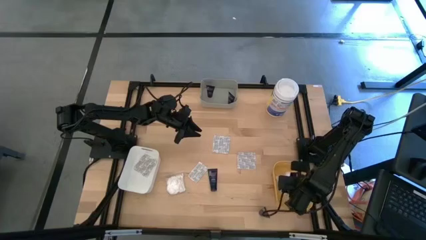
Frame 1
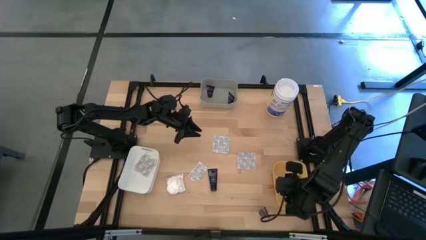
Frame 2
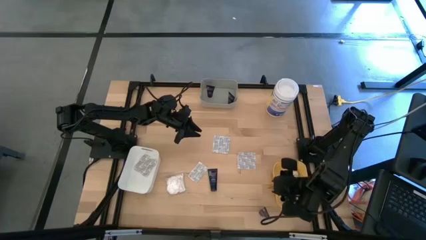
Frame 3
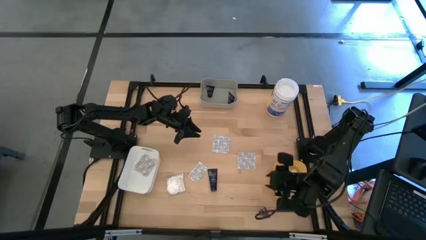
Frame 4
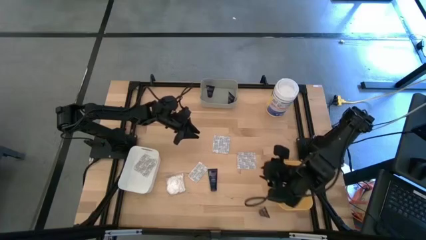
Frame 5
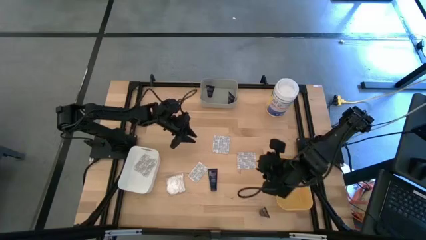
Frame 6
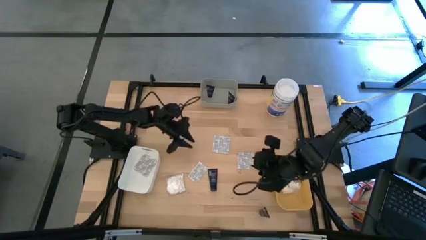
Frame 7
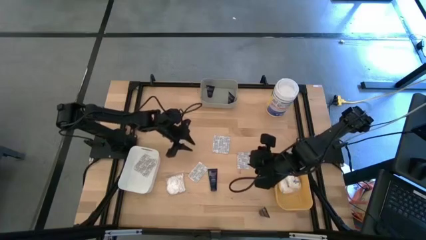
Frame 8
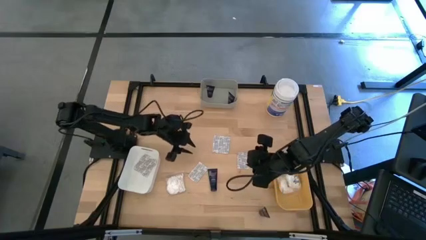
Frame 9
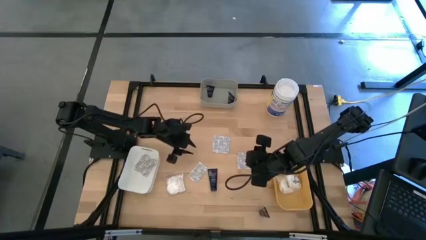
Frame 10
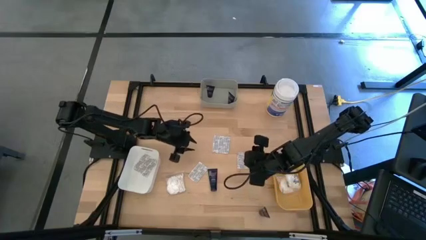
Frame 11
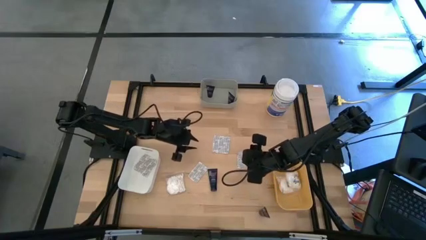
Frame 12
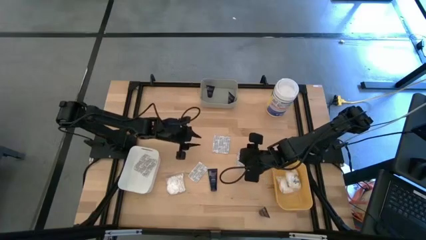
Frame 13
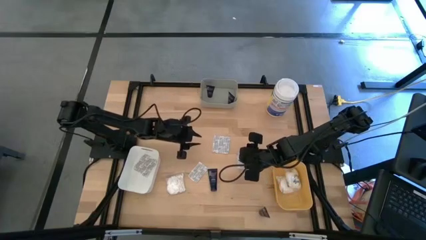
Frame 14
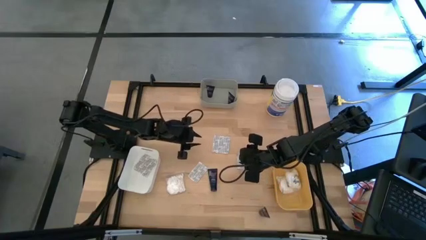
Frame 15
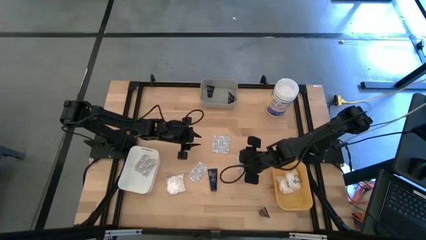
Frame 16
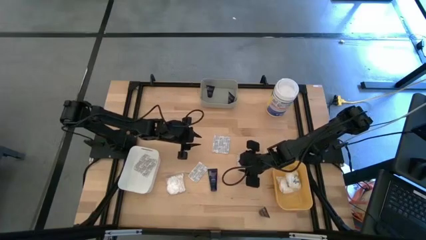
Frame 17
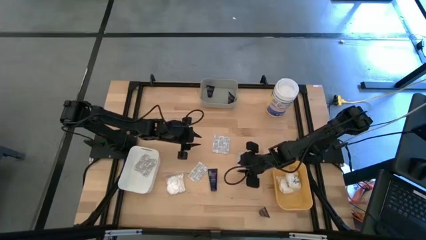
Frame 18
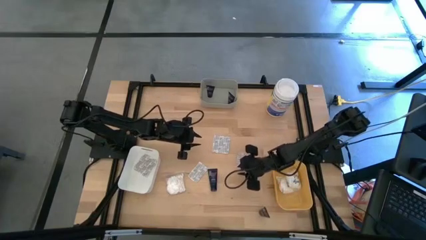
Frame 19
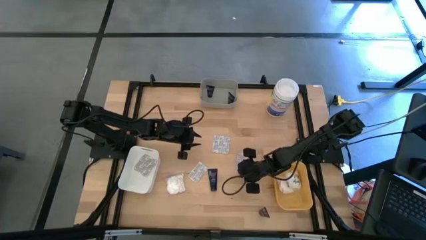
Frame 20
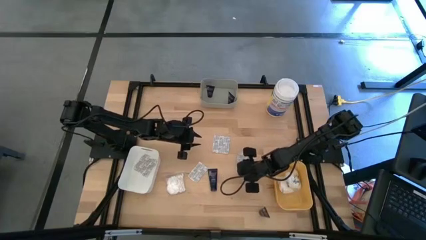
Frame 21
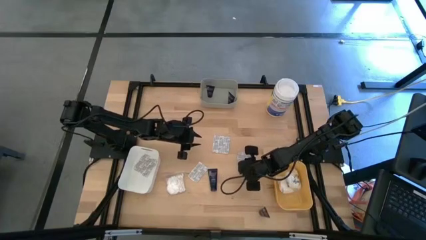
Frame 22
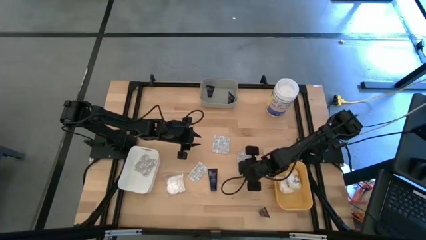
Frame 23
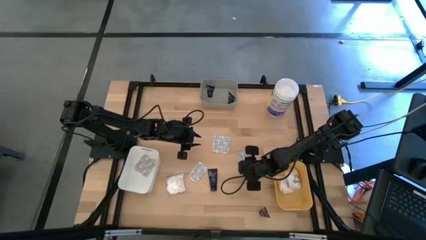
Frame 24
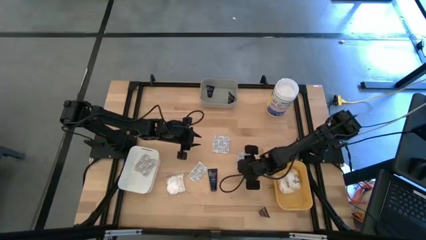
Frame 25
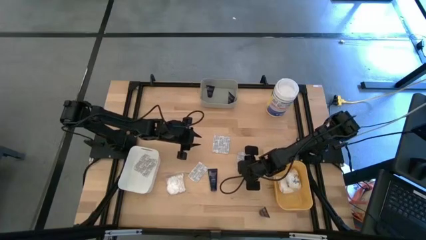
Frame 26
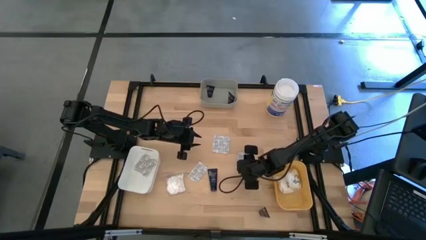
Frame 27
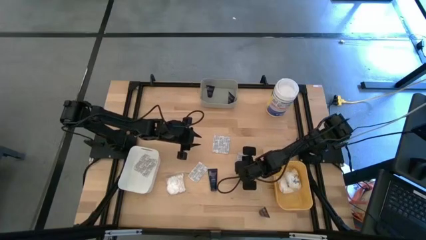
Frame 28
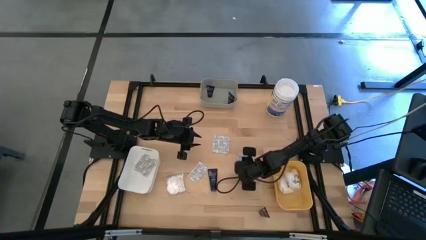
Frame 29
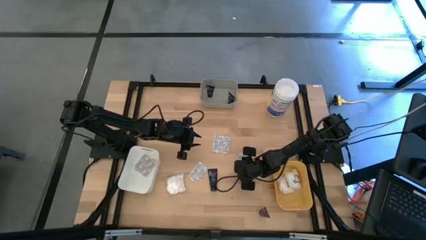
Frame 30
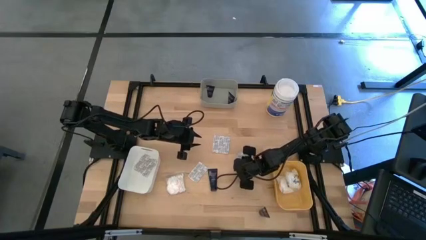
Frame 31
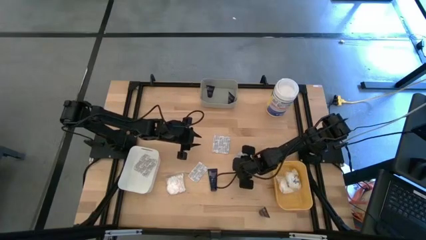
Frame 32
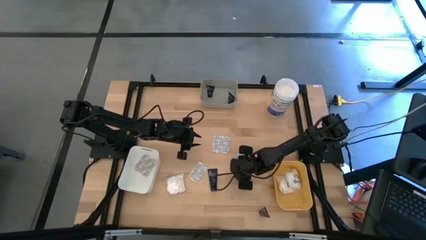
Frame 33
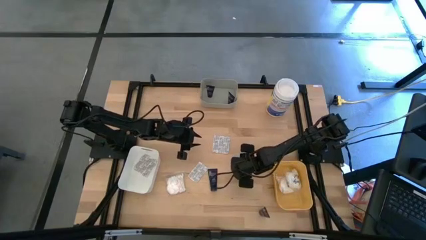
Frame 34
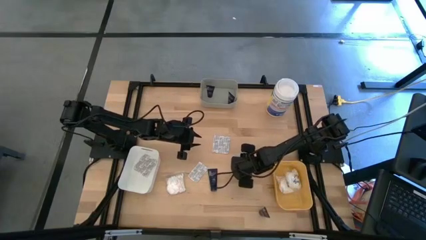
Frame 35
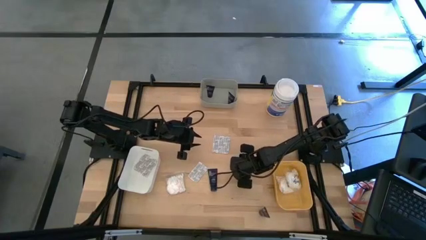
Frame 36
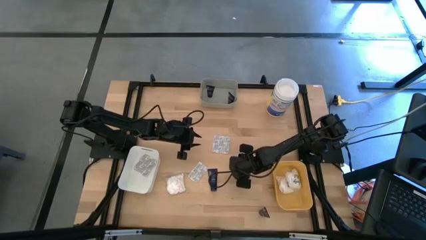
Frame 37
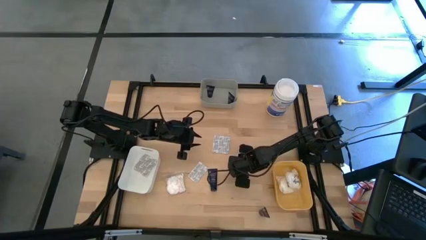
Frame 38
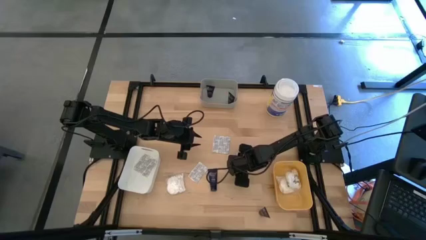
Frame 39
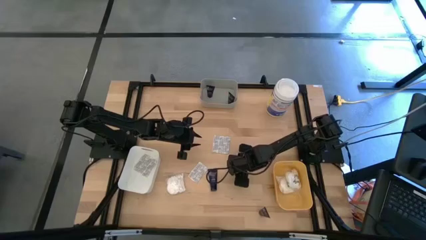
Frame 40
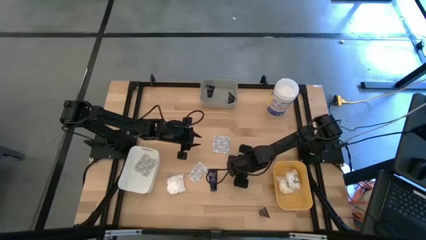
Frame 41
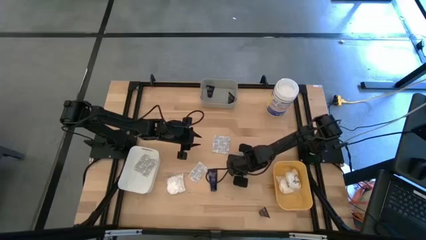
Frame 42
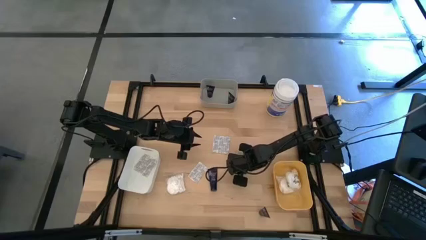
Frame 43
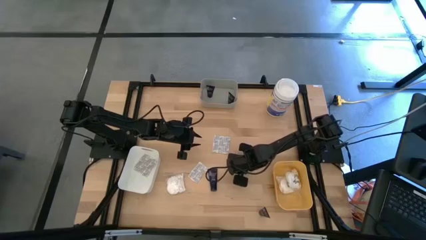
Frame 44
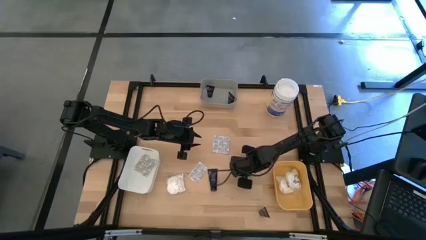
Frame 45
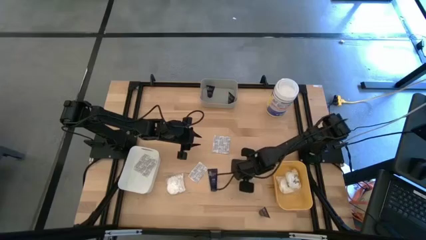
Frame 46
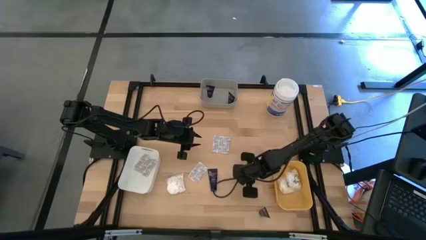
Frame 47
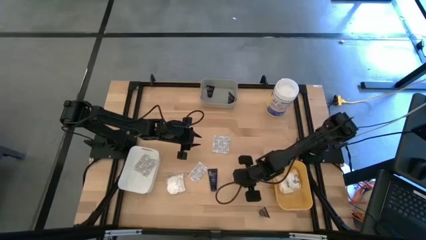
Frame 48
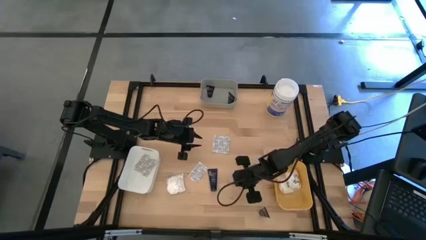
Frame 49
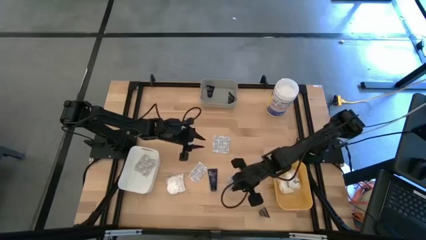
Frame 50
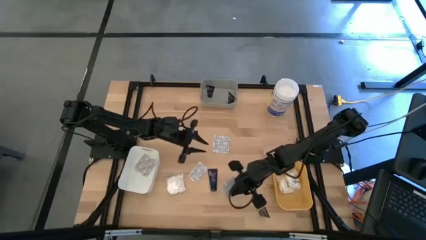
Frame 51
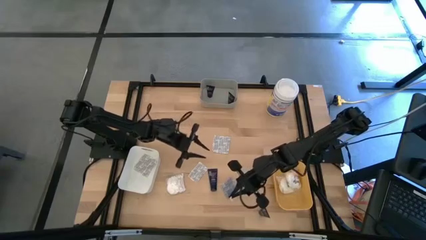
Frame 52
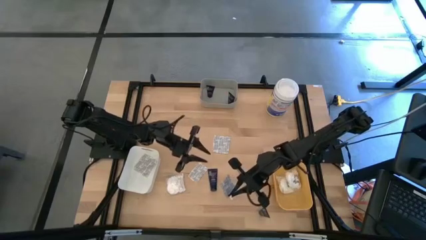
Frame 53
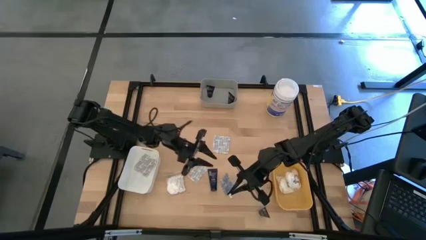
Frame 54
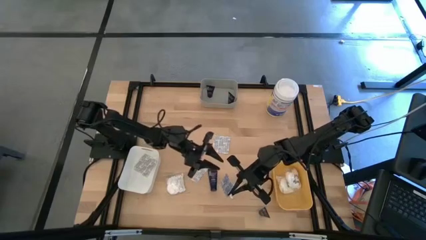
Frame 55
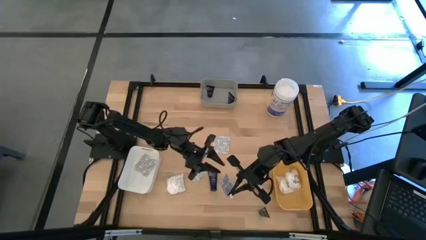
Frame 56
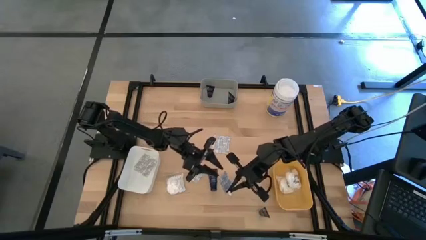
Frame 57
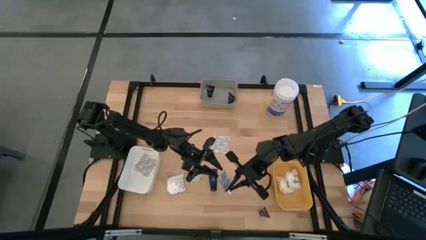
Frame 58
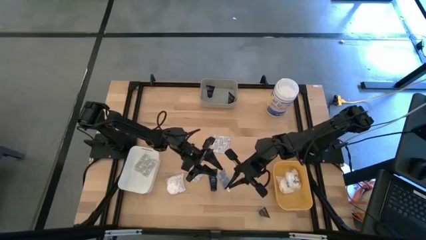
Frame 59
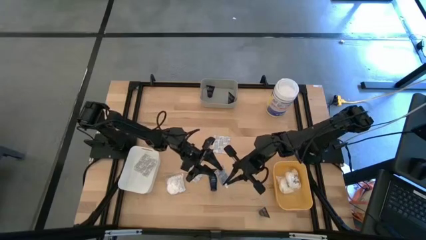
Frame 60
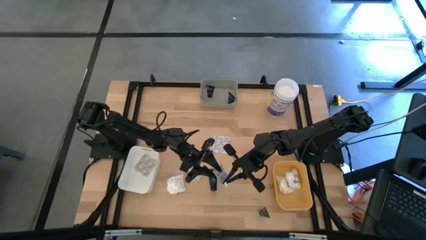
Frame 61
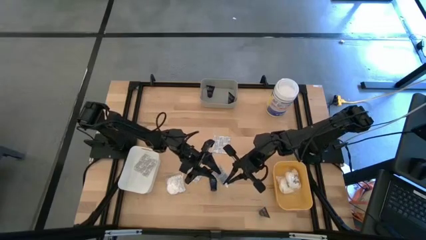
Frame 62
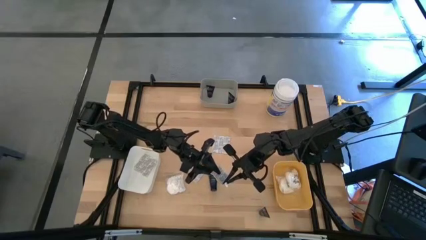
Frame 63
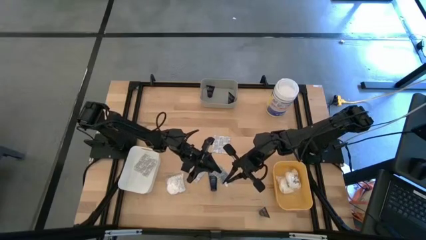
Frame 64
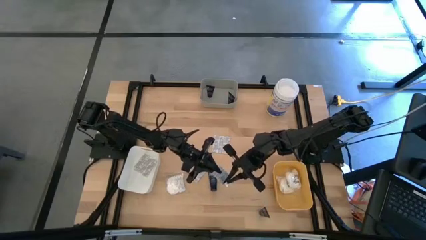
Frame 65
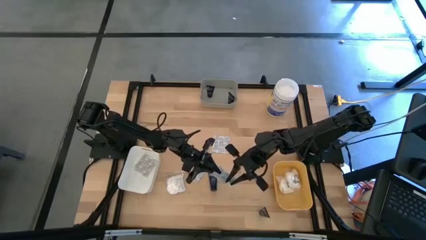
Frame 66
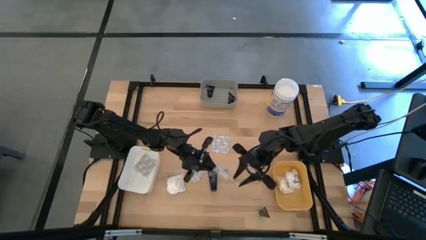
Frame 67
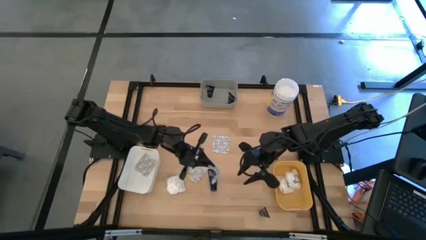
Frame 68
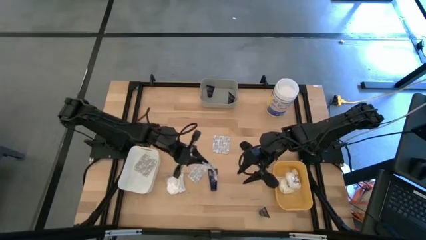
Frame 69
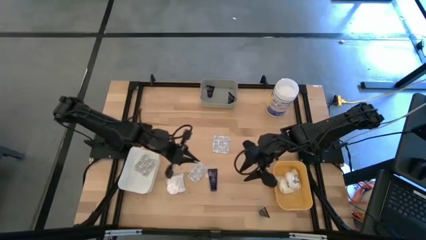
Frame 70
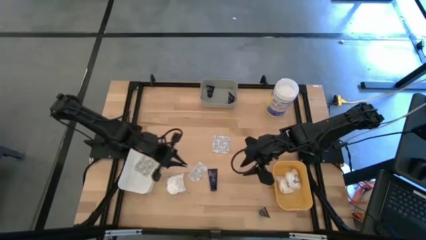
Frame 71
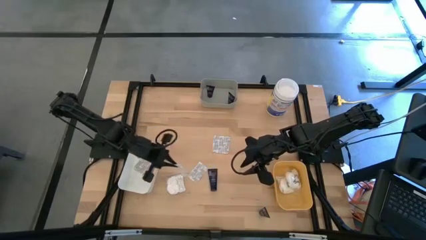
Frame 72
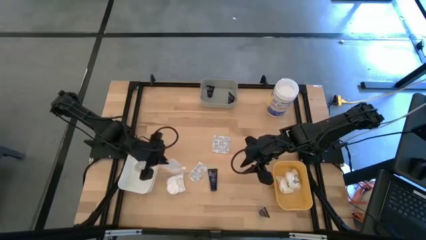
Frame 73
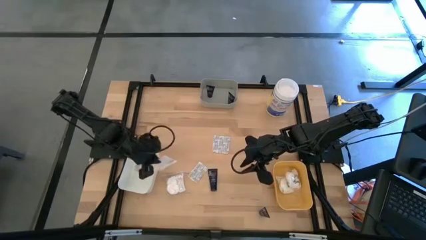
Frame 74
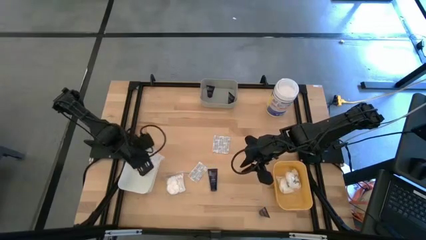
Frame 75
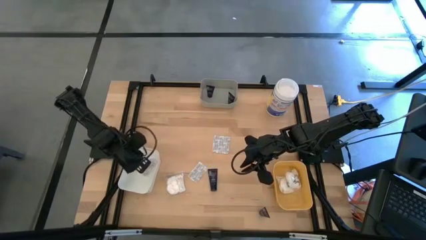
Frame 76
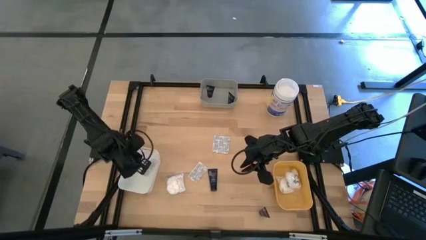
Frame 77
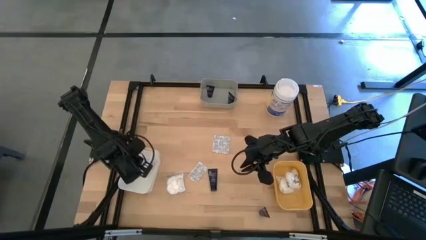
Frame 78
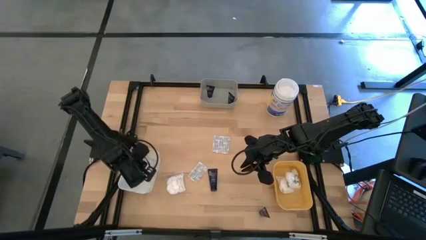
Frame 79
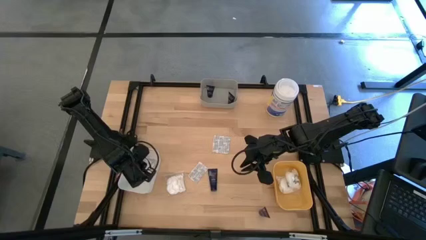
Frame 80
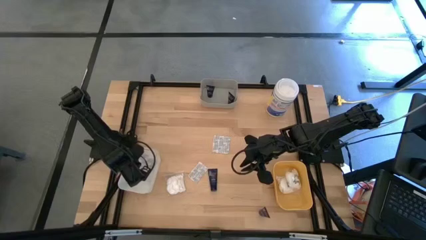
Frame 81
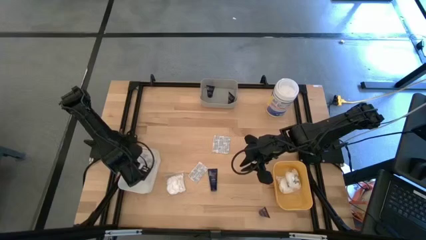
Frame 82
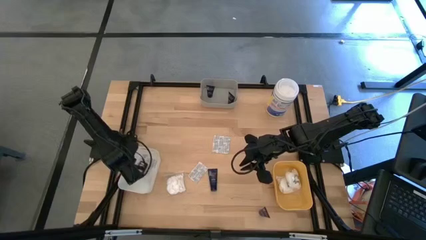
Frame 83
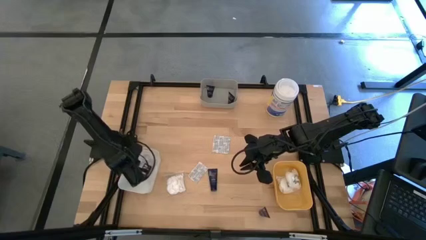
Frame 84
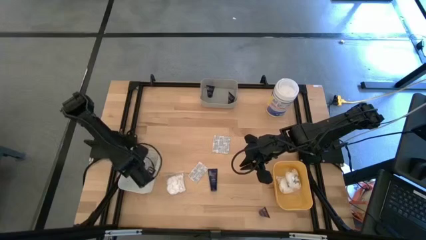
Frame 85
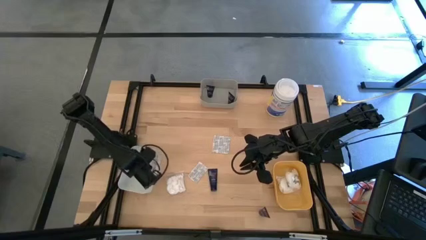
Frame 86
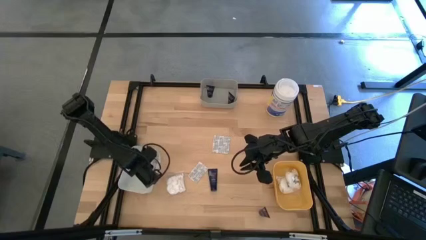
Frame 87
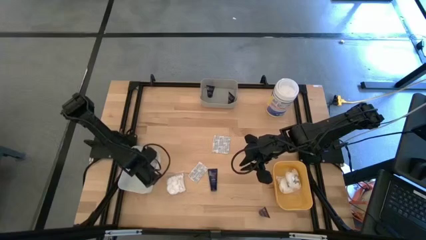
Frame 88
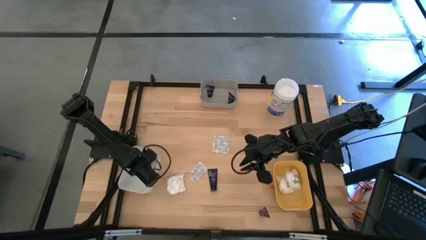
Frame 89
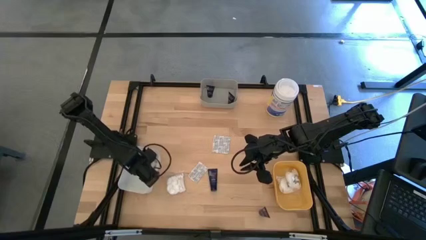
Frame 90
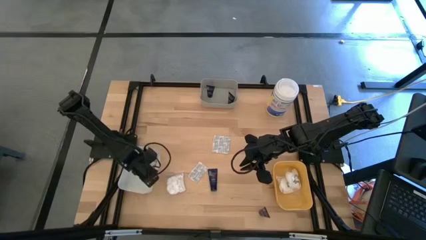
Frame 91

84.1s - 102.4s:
Task: Pick & Place Travel size toiletries
Put the bandage into the white bin
